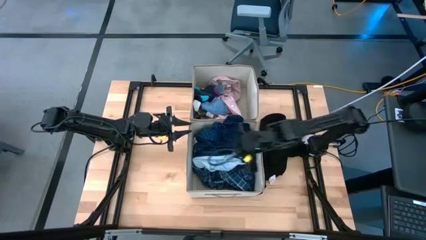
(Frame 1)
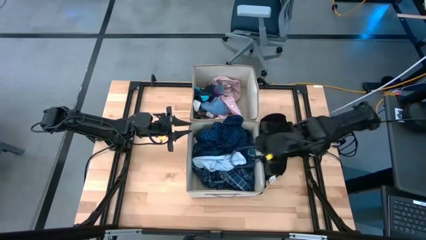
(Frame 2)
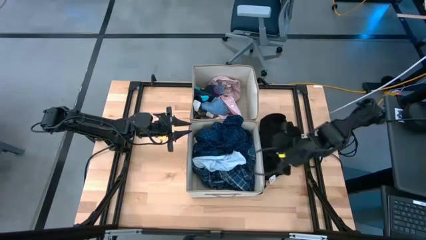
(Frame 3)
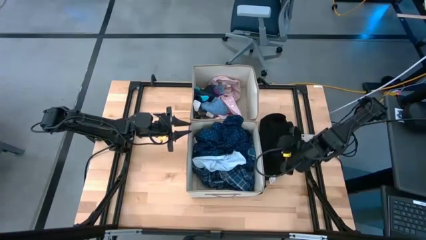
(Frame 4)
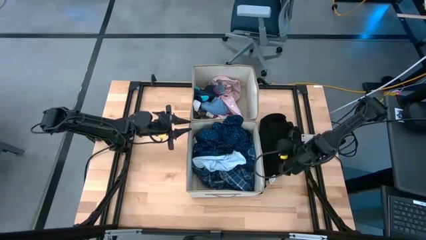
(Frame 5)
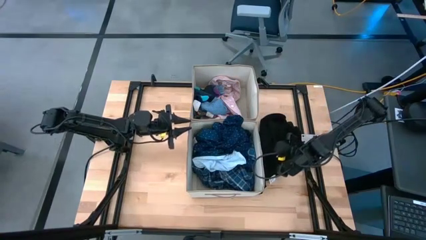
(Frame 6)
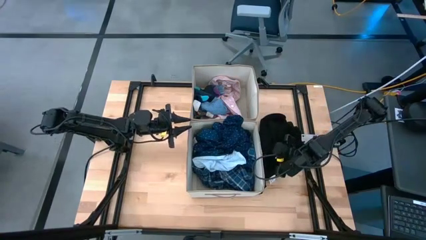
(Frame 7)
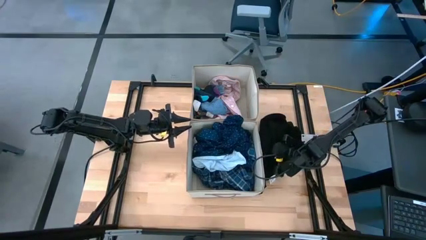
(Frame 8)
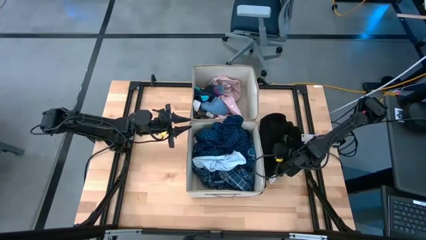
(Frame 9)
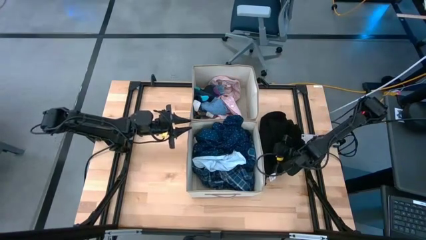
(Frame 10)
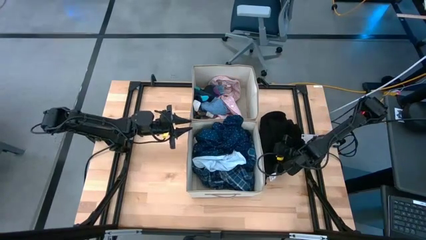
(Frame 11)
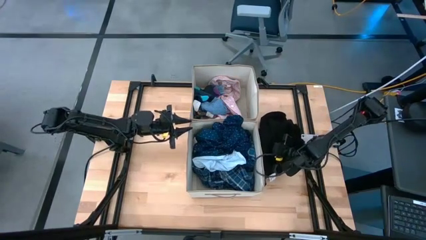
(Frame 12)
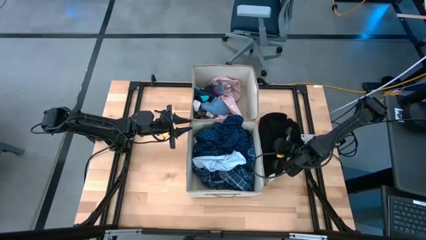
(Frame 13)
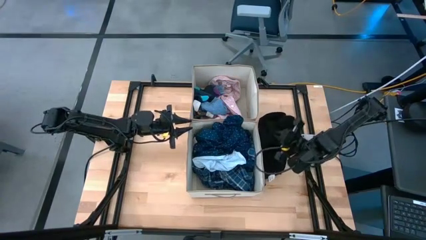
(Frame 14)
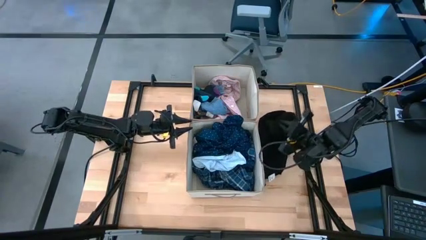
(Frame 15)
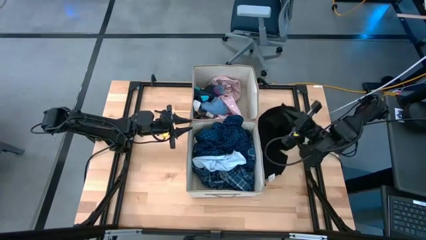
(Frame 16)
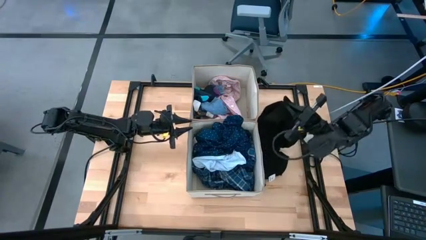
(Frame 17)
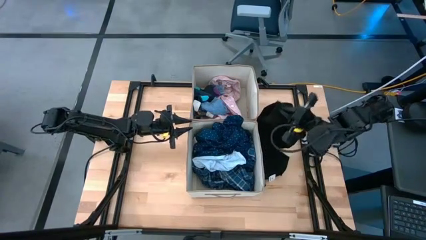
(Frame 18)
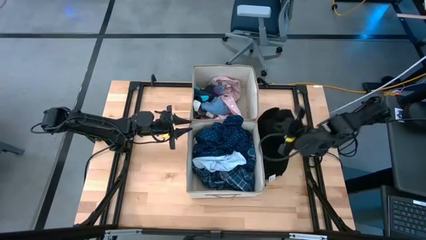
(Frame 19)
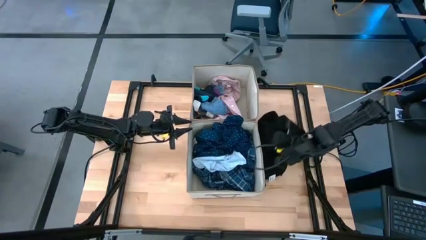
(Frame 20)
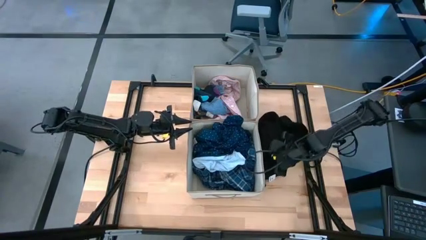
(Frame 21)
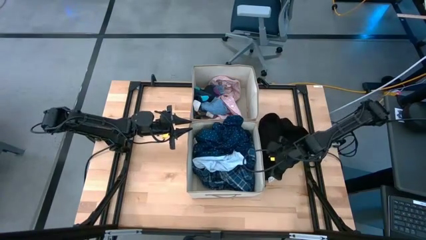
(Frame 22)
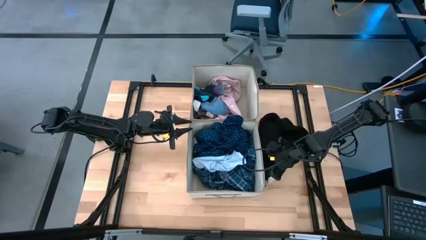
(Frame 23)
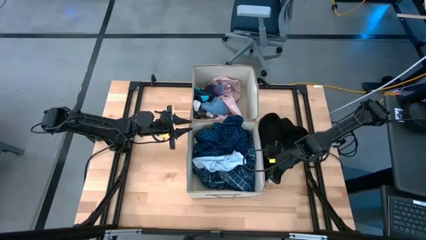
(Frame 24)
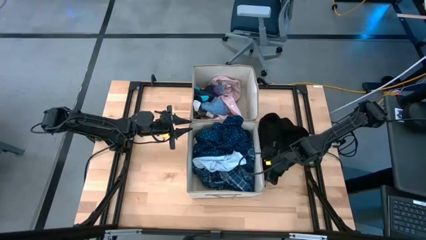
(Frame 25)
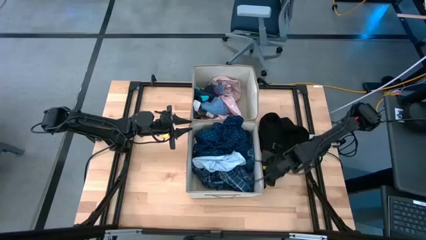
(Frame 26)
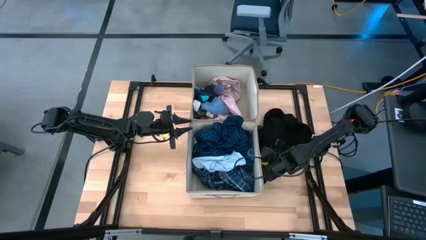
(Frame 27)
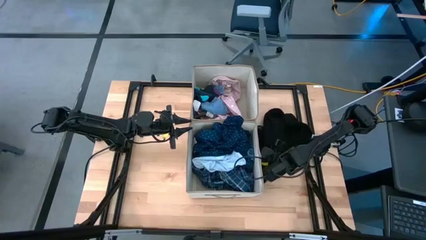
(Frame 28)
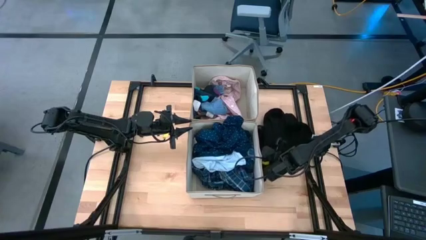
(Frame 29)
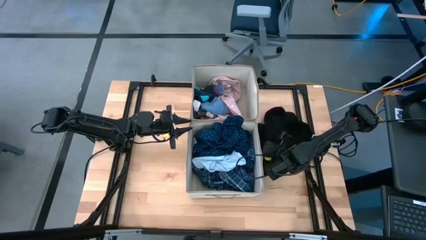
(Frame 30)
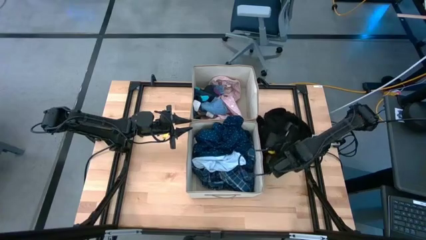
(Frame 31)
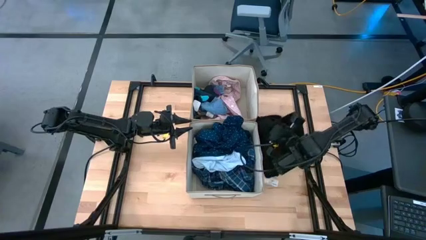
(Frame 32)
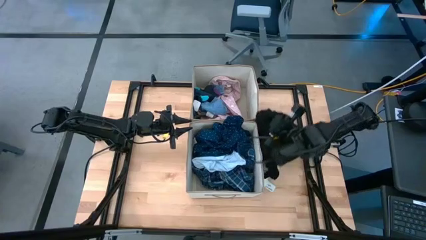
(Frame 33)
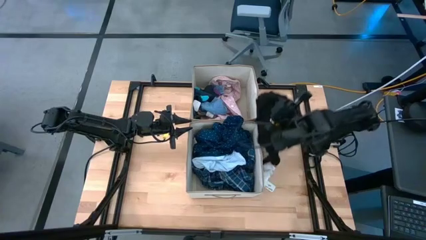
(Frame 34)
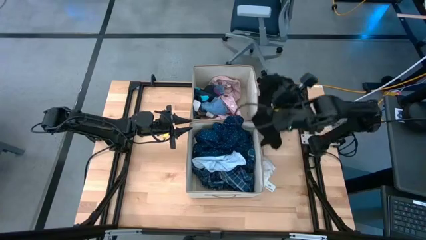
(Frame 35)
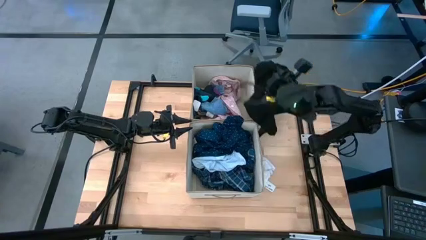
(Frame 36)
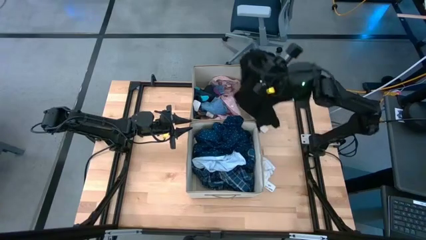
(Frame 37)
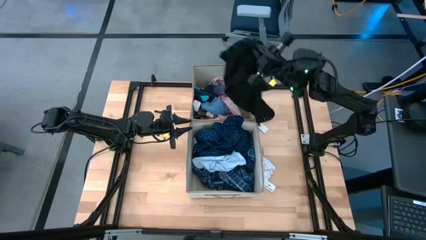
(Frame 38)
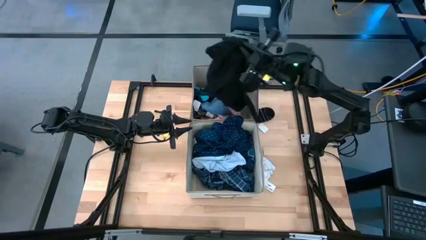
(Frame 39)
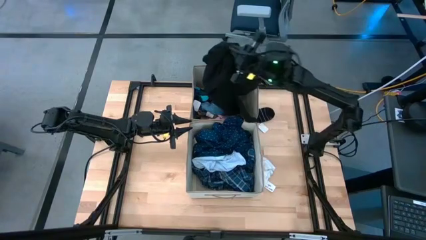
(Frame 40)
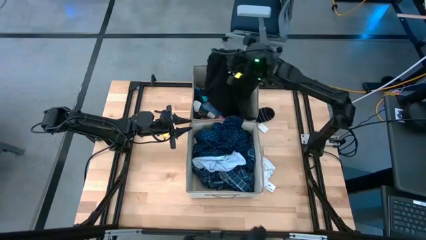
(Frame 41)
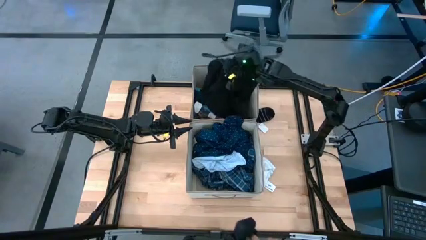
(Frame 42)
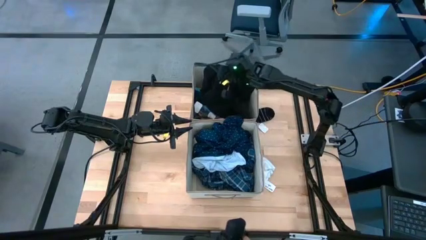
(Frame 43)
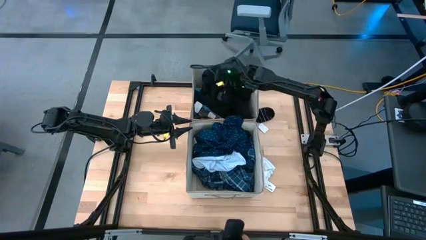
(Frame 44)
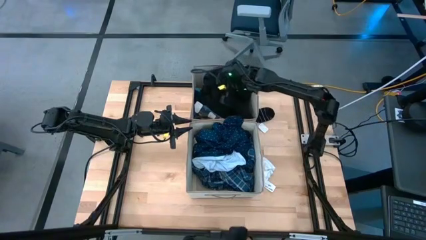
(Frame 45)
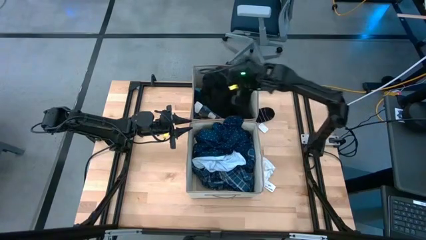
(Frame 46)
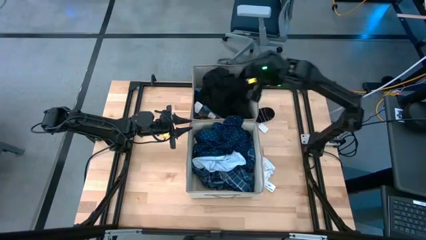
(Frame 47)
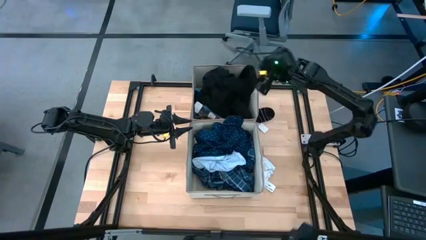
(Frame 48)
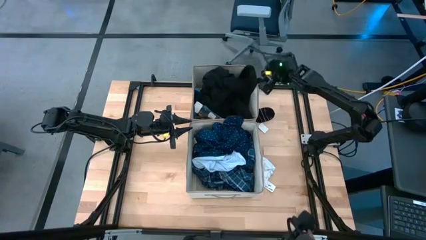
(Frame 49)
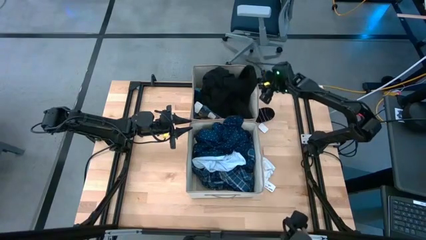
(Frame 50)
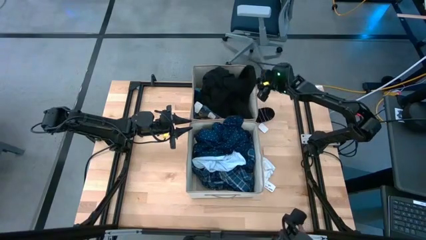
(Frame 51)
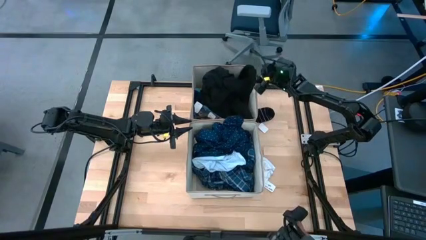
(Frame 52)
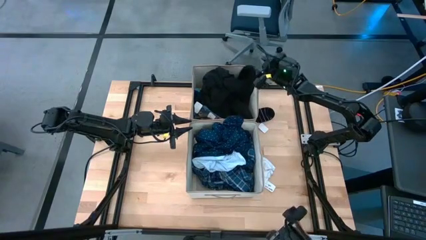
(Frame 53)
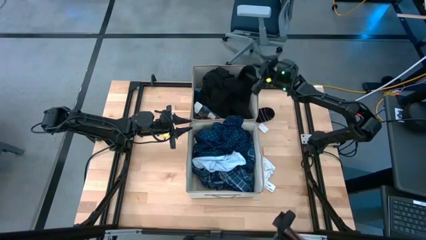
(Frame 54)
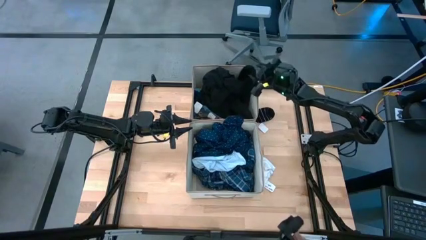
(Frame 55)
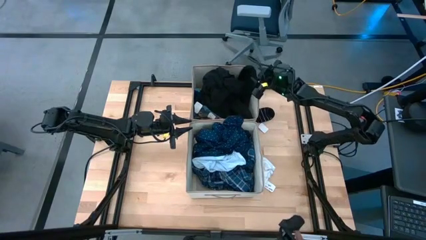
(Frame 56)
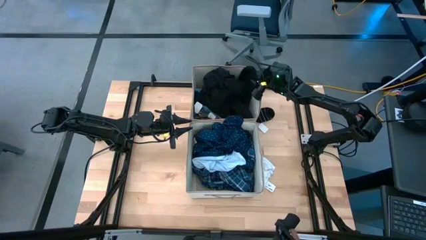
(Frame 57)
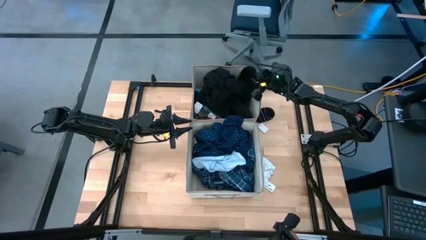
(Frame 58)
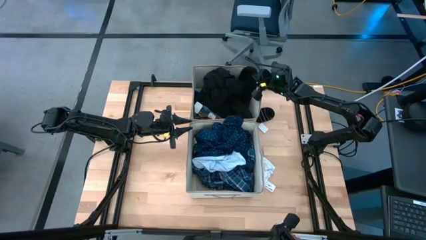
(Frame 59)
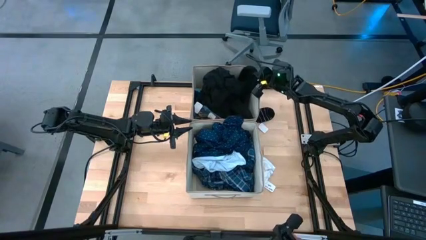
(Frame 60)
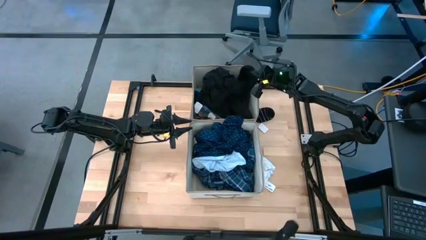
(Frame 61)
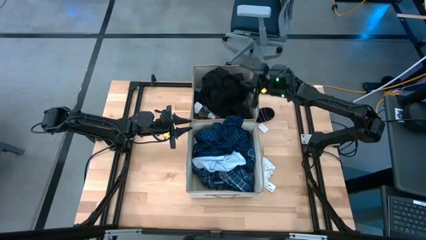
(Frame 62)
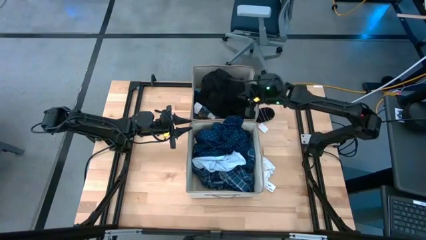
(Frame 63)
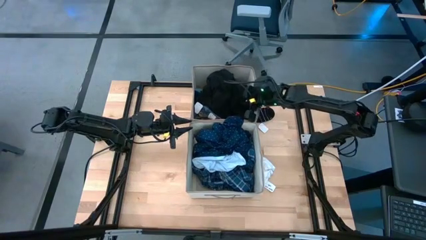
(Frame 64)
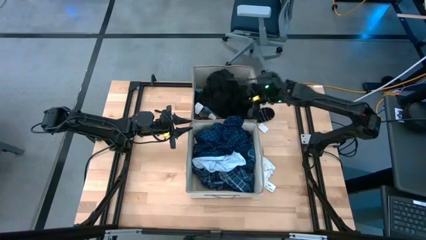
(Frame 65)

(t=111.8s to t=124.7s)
Task: Sort clothes
Put the black shirt into the top laundry organizer

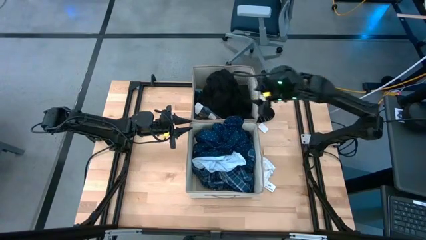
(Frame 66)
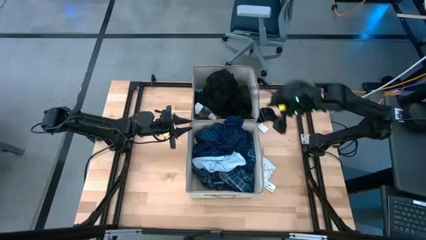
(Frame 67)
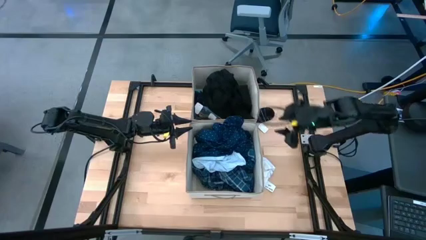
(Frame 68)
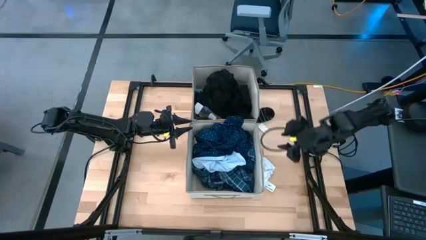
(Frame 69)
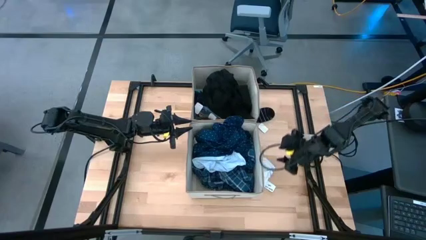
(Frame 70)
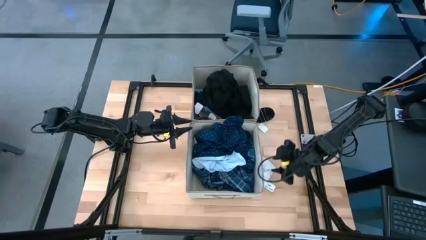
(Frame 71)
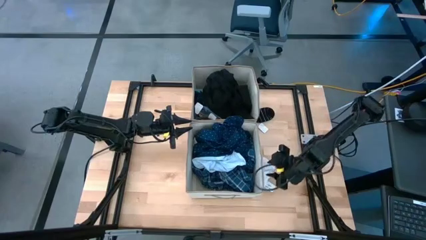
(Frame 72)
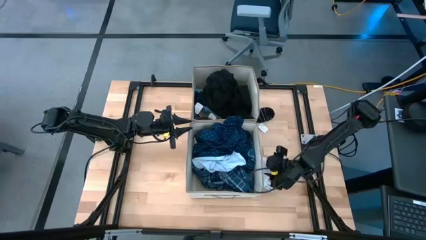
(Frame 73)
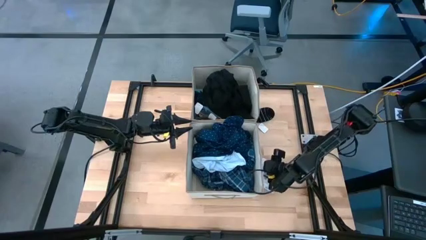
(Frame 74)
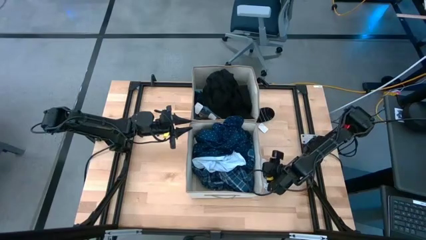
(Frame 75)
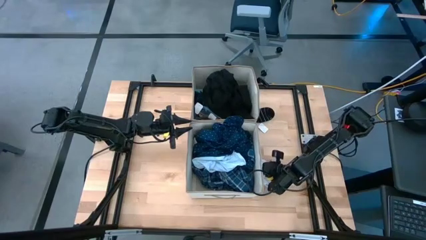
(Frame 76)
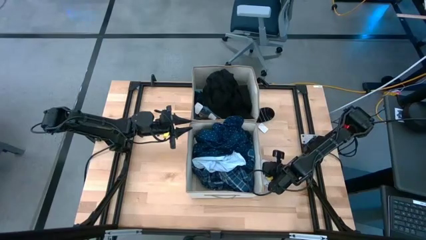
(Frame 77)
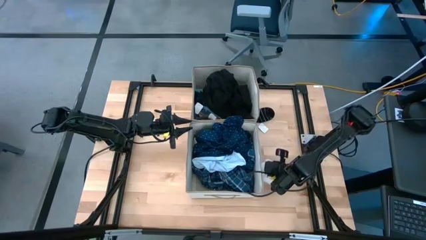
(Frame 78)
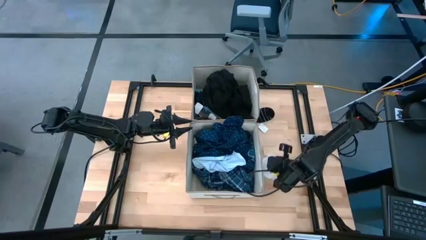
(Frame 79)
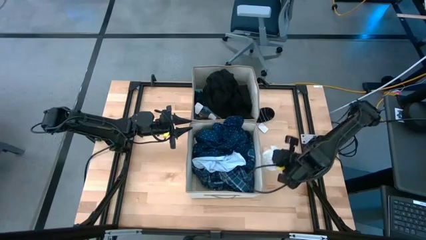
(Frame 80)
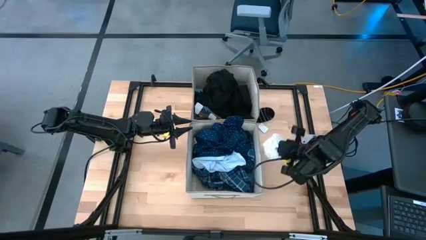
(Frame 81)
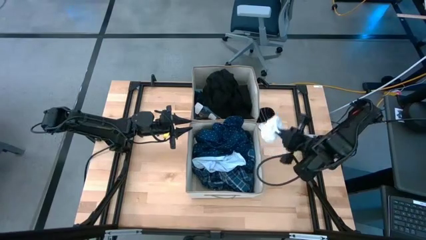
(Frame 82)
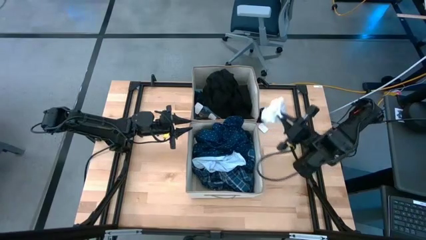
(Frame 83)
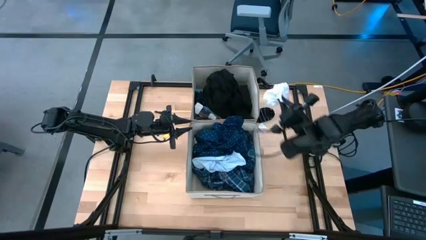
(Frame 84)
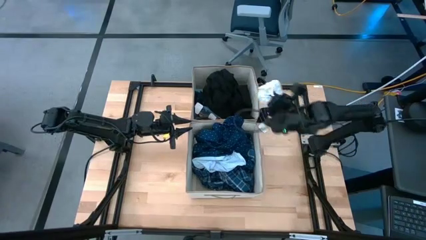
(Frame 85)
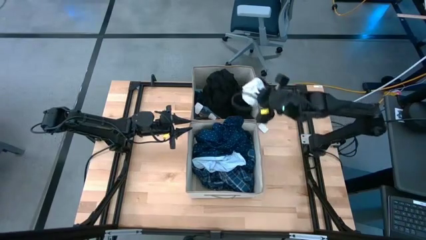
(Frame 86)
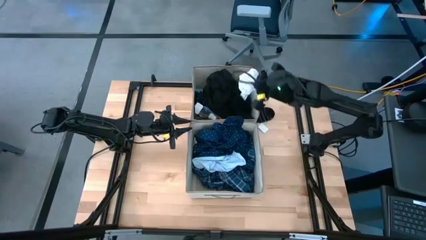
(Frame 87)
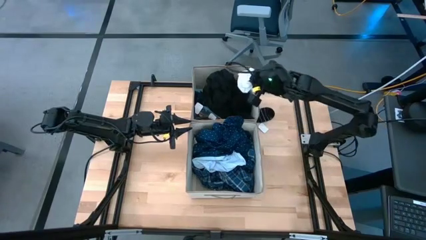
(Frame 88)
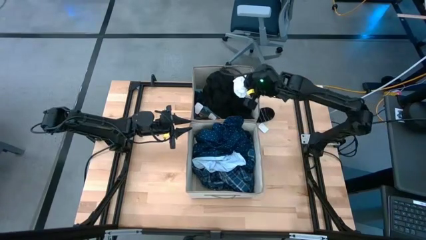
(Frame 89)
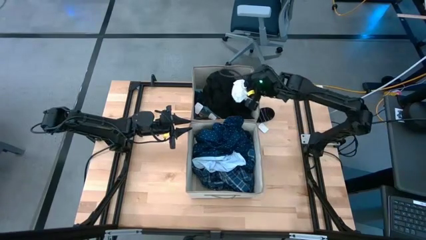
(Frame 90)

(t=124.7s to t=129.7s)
Put the white underwear into the top laundry organizer
